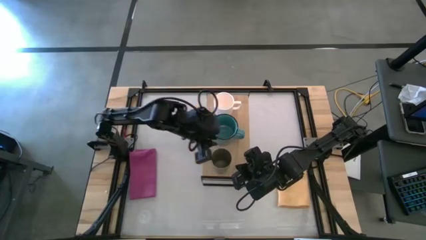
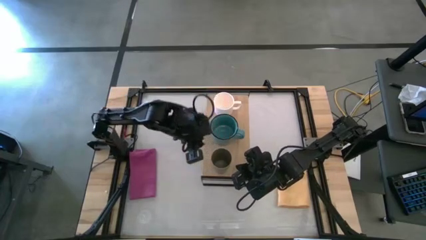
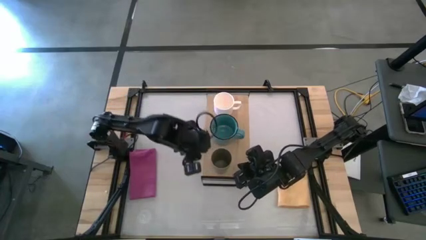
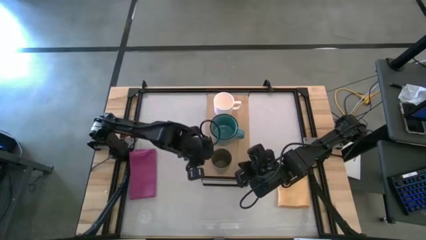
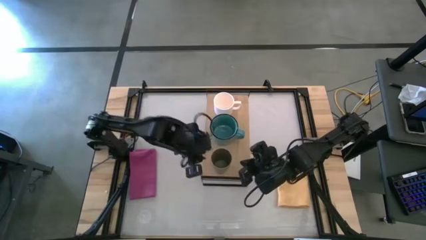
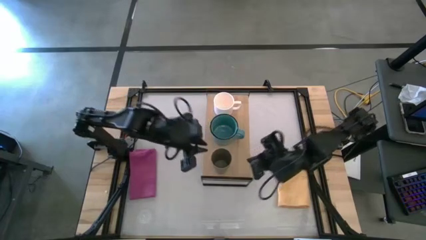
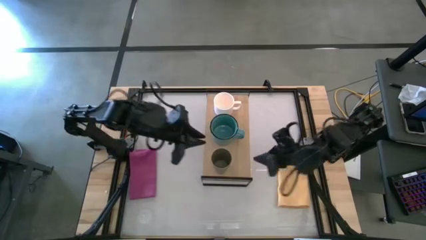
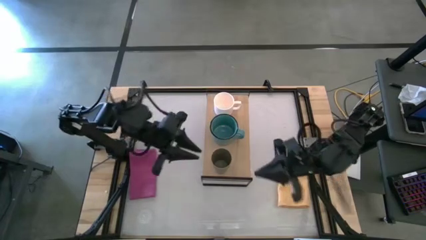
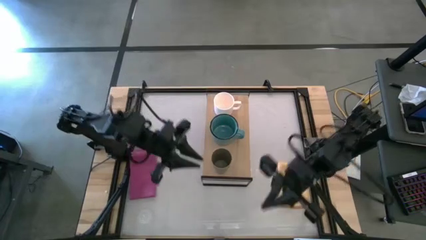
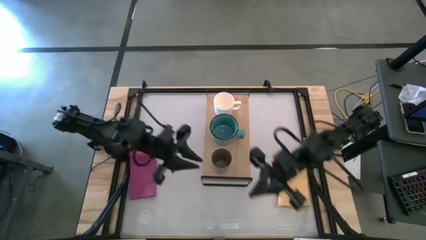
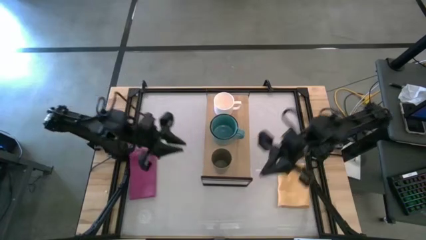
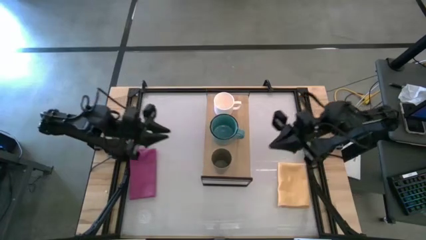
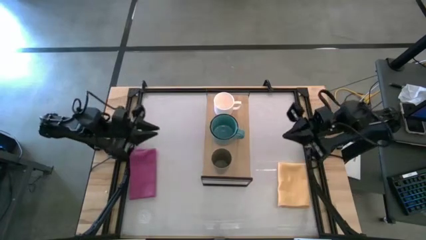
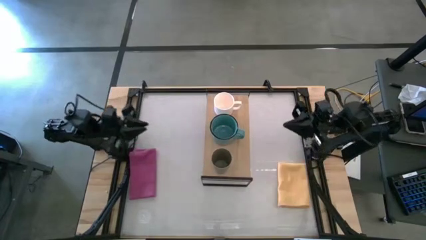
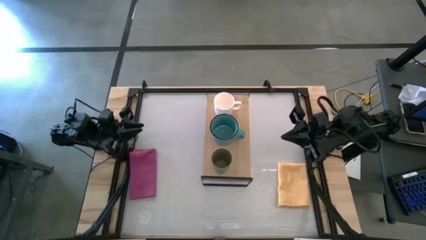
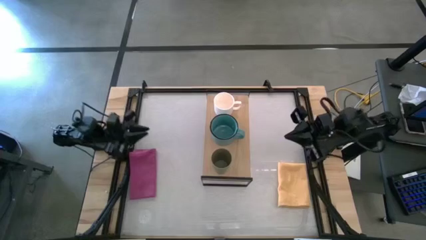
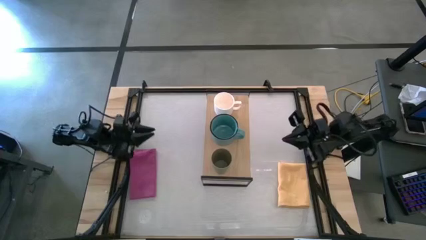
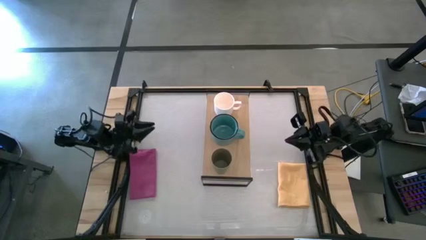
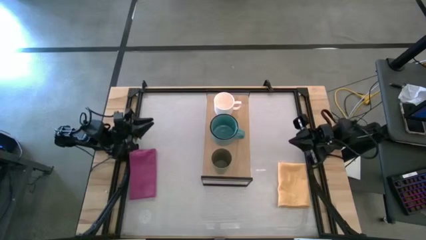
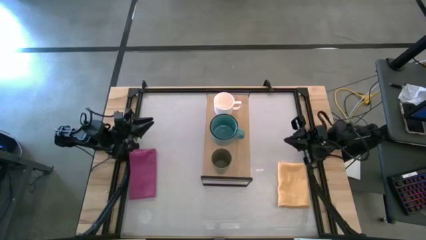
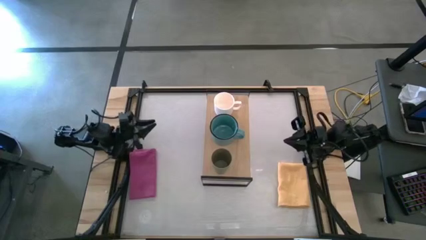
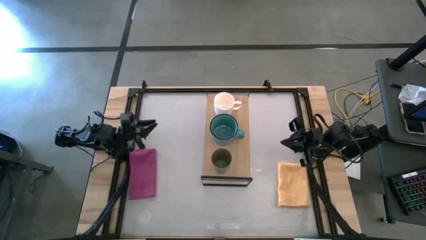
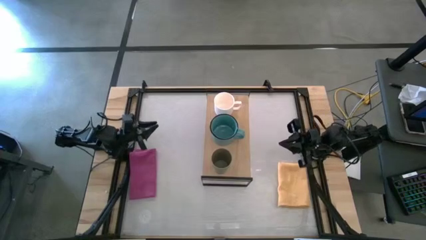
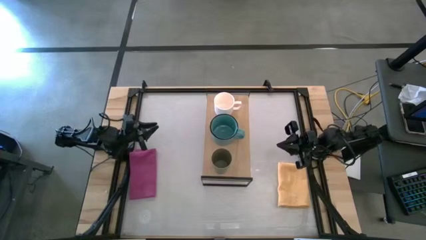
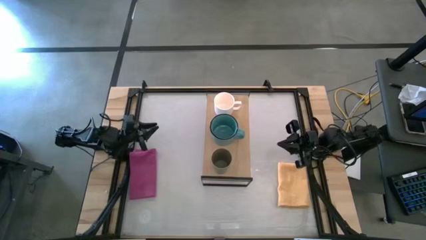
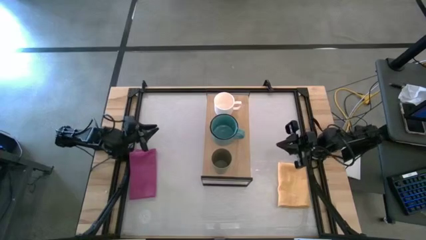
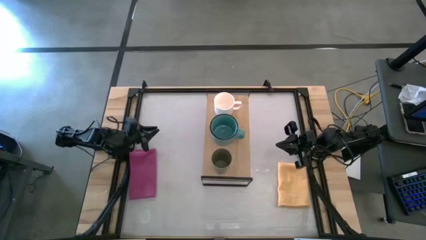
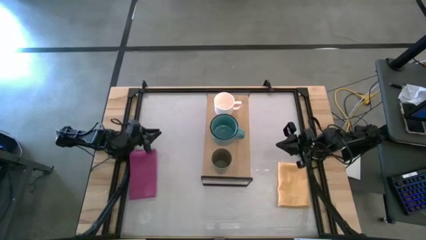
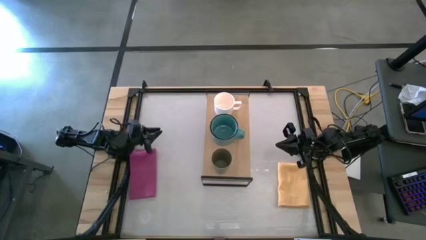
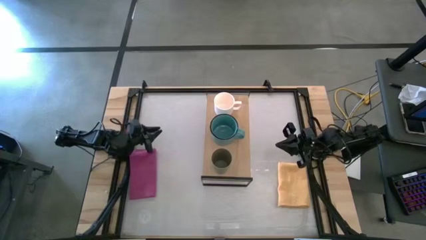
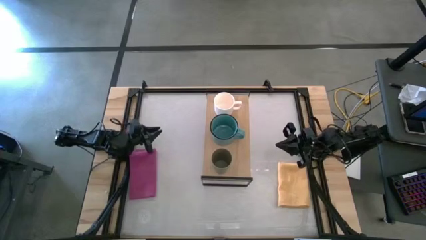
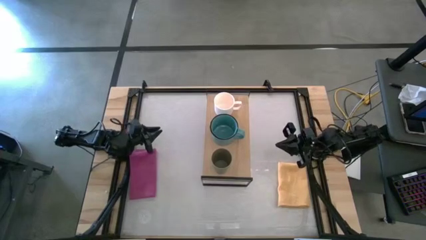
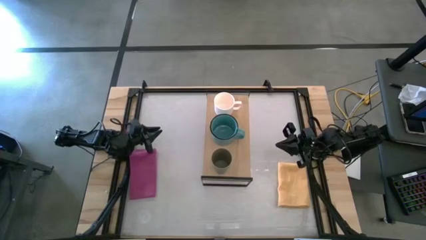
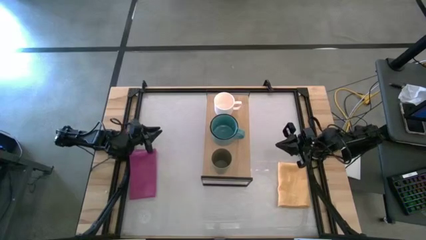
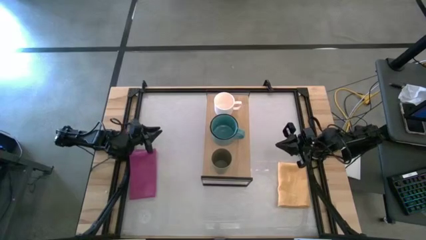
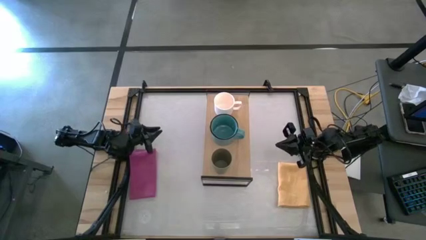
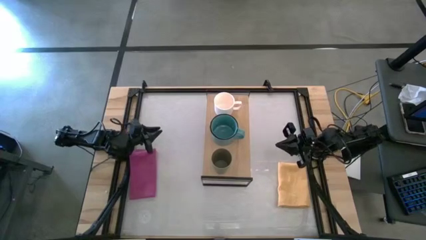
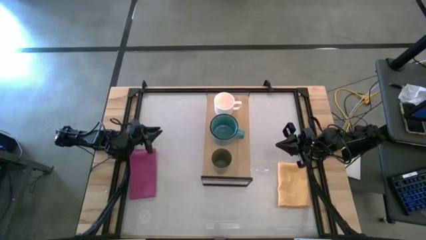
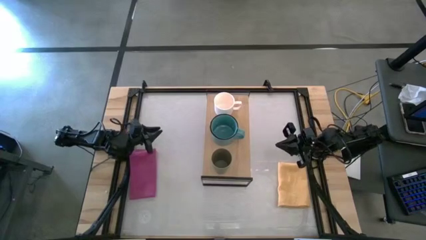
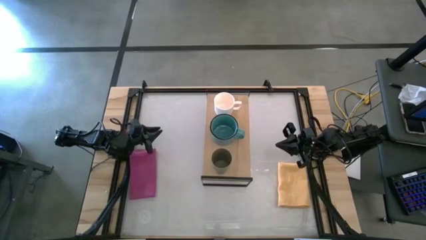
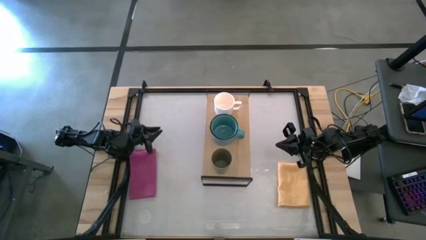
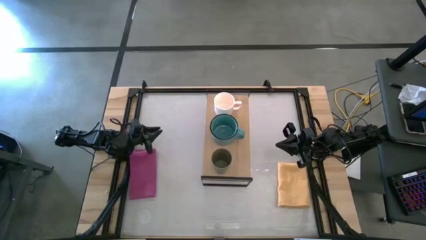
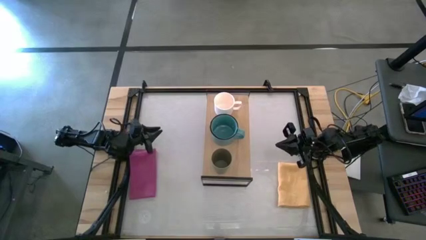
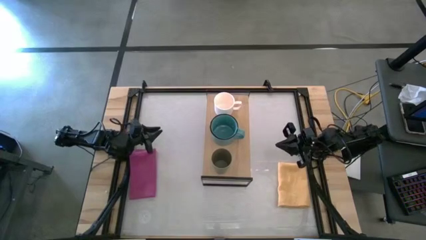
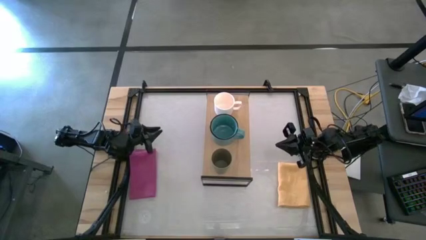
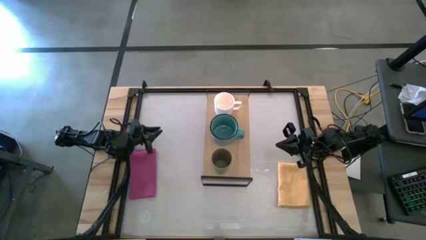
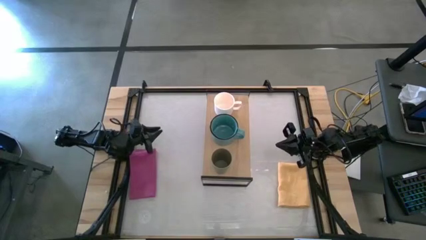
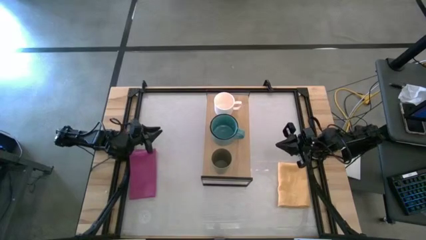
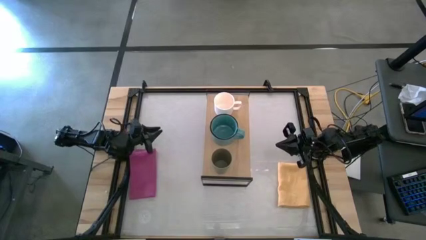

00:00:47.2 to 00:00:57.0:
Task: Stack small to large cups/mugs on shelf
Return to Home Position

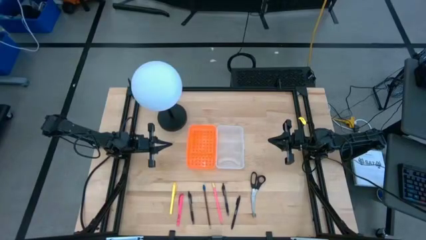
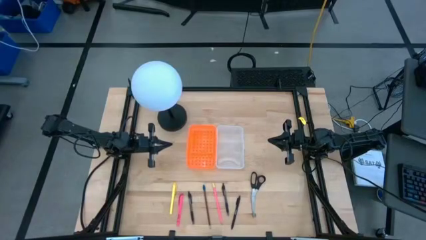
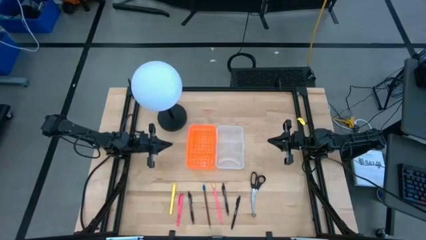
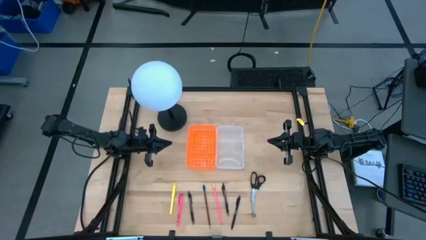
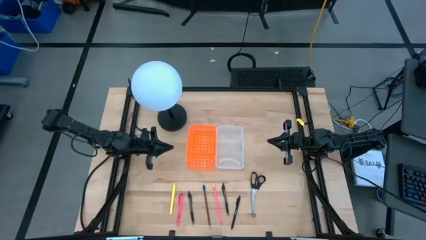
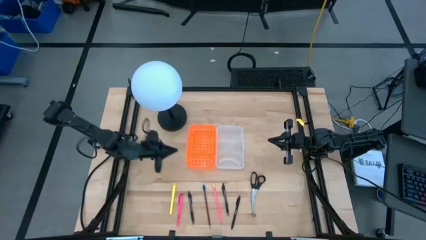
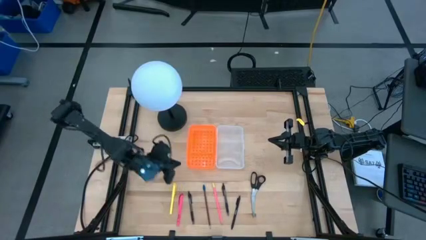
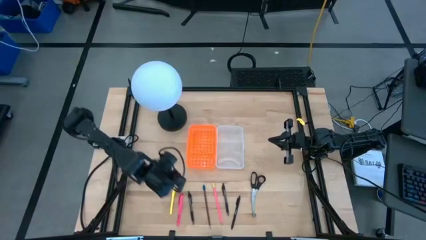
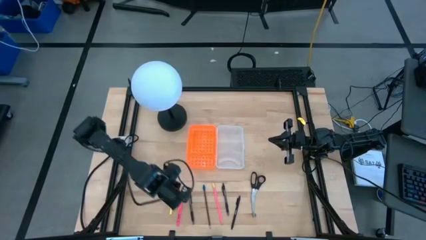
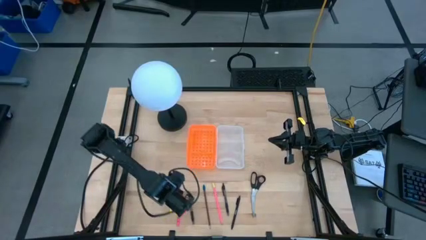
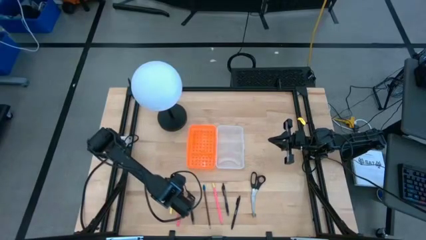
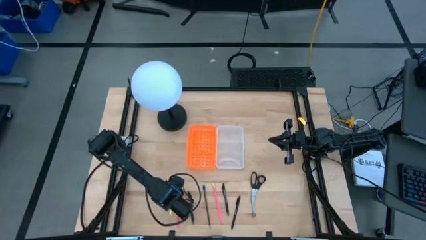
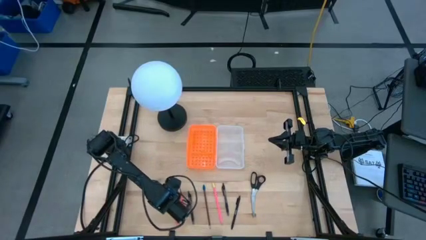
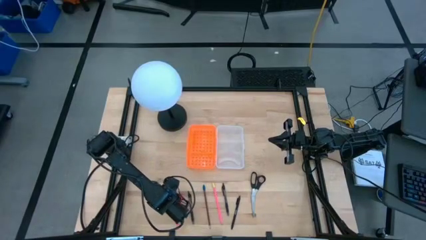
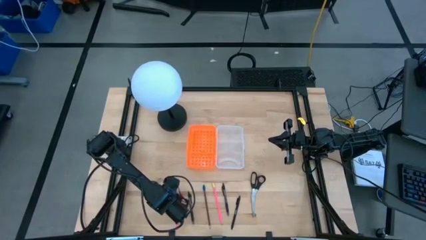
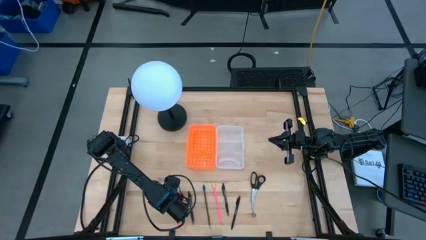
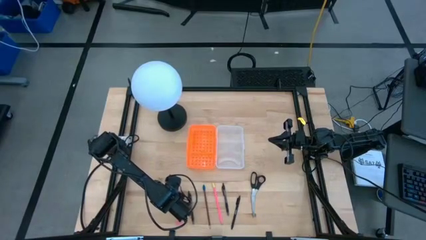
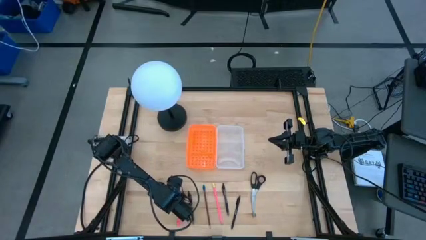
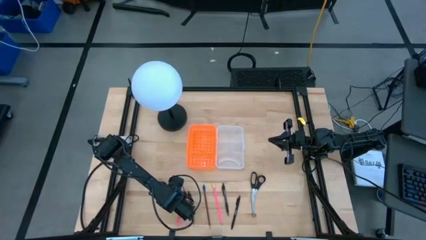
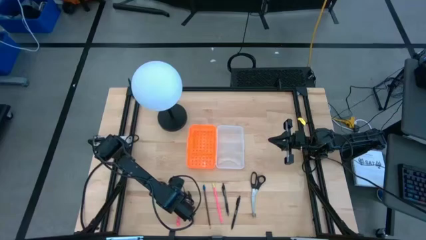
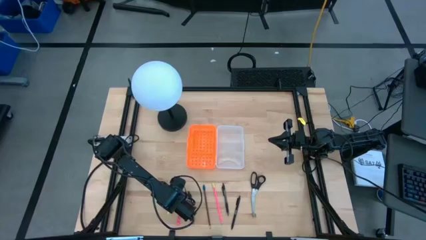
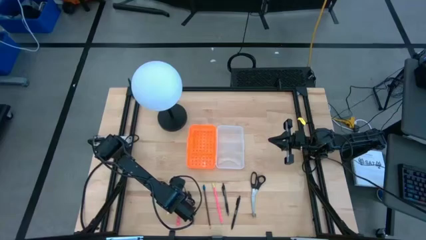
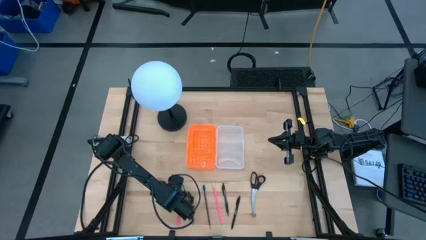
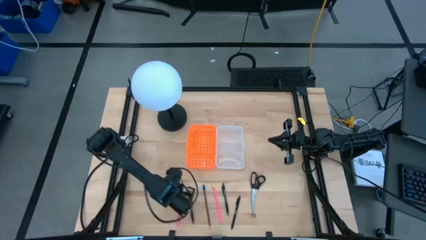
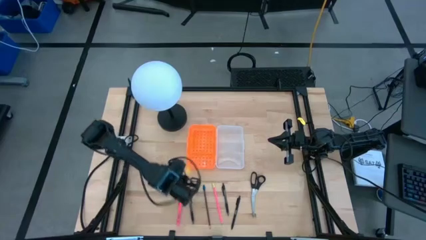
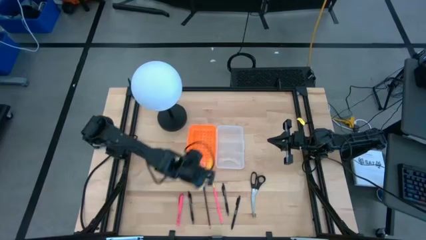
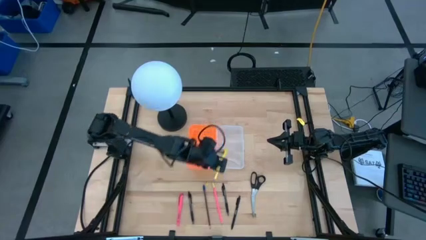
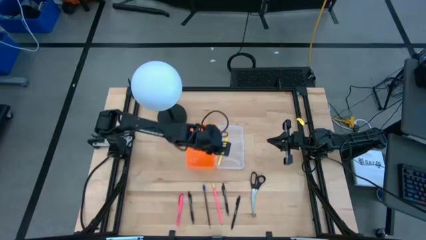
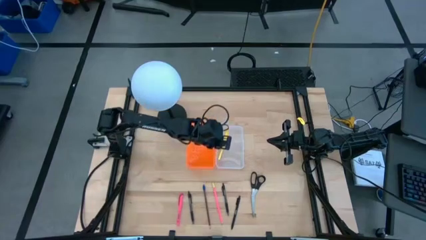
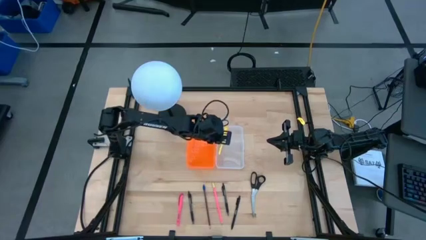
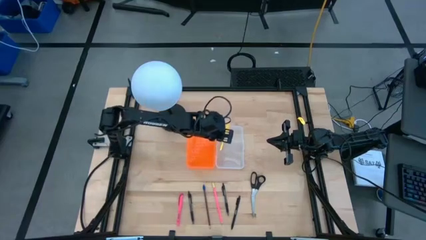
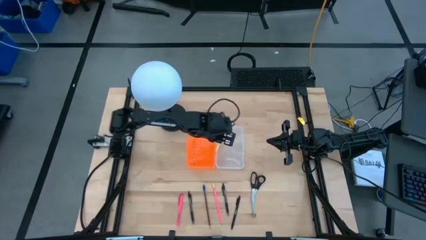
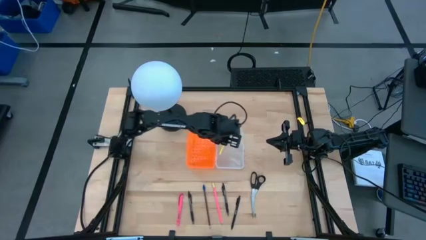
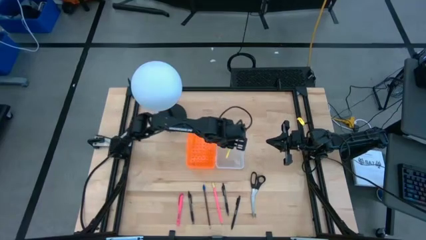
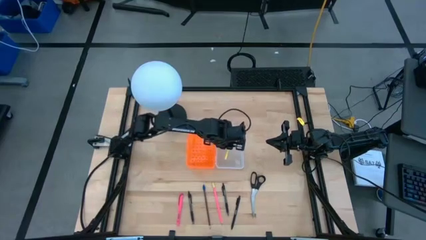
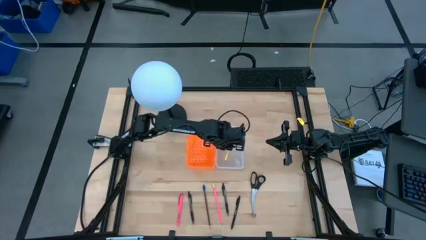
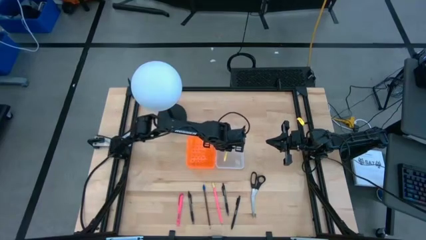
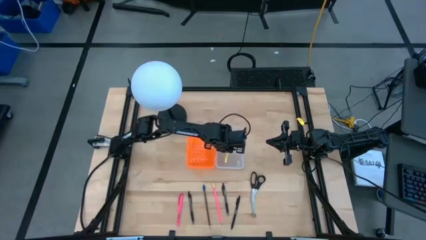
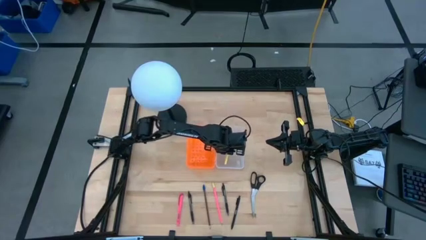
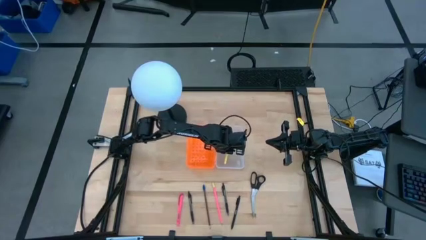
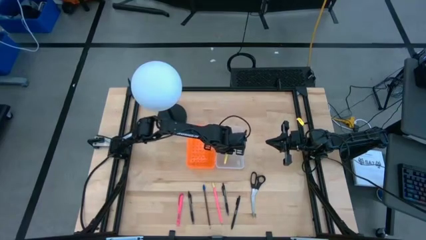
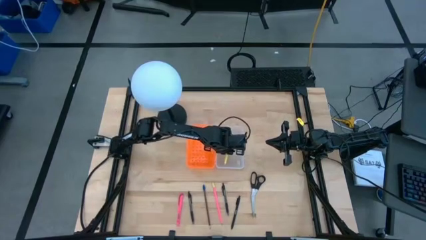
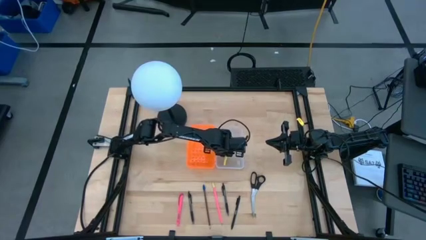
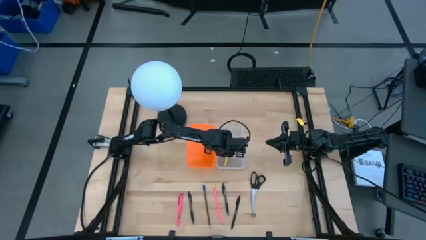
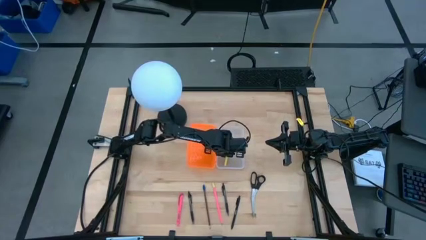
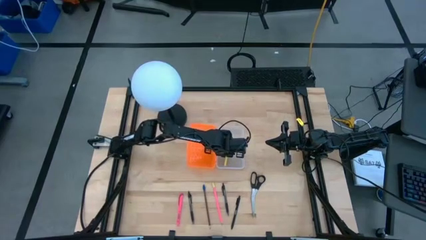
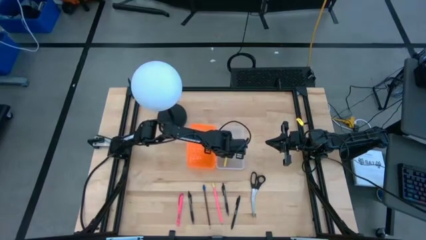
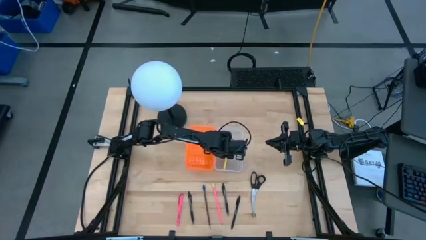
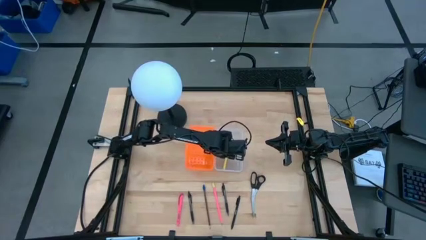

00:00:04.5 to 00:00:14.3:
Task: Pick & place school supplies into a supply box
Put the yellow pen into the orange supply box
